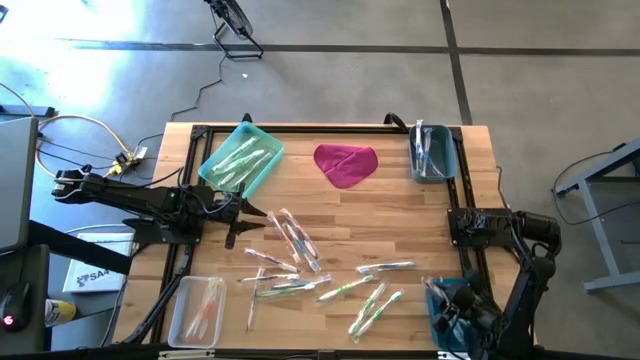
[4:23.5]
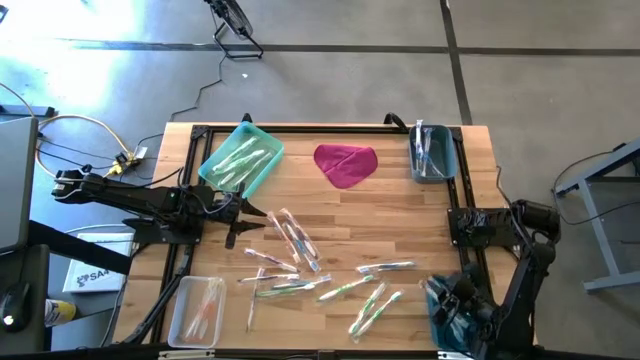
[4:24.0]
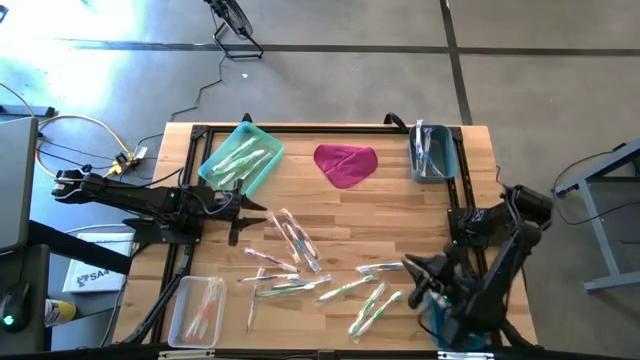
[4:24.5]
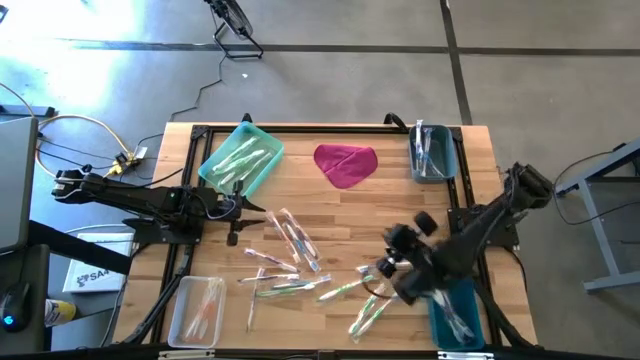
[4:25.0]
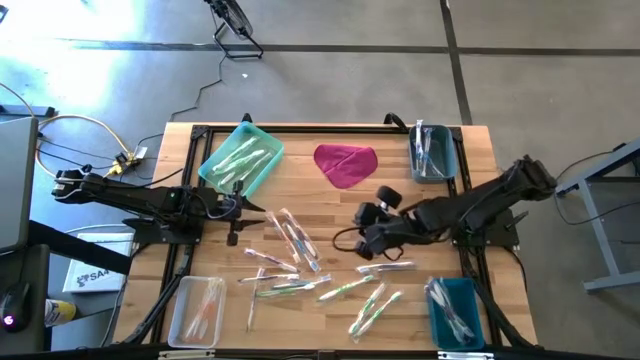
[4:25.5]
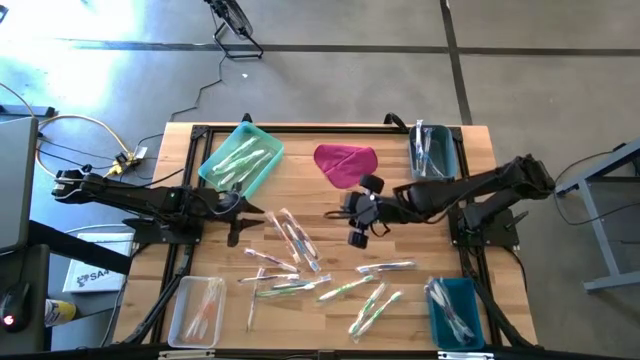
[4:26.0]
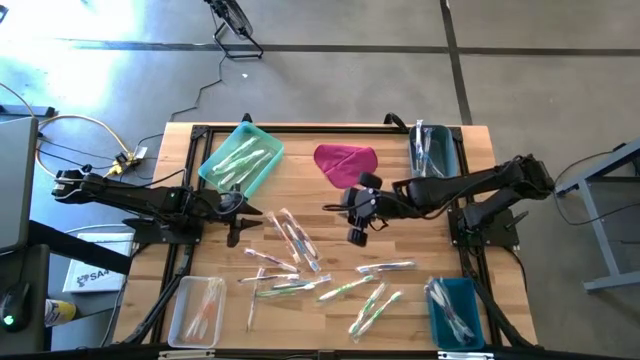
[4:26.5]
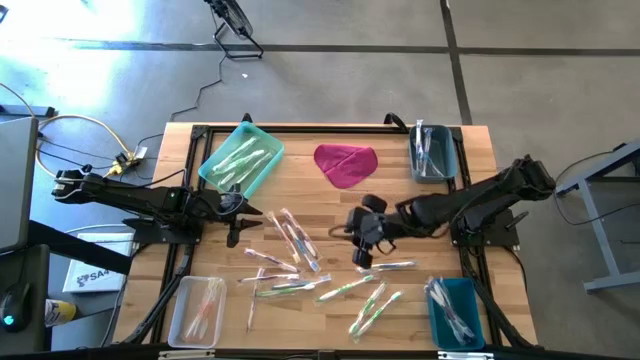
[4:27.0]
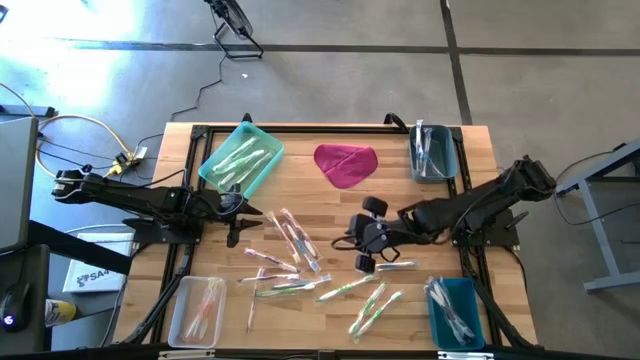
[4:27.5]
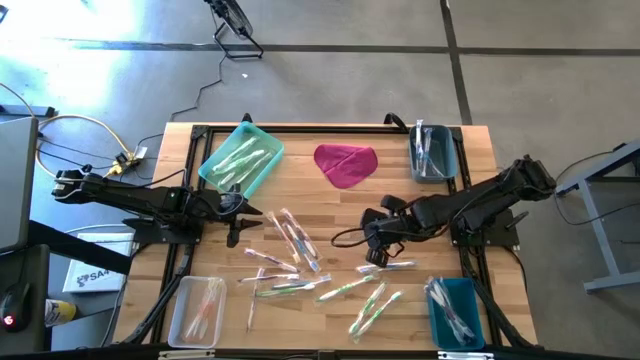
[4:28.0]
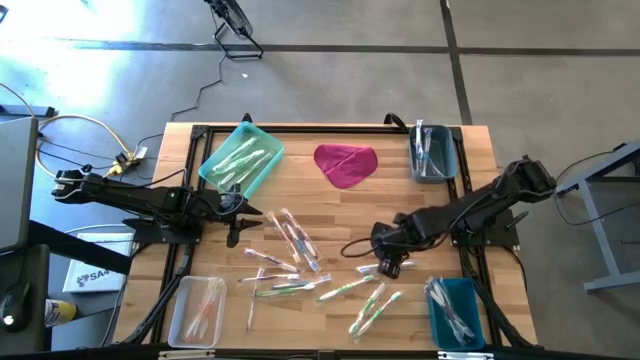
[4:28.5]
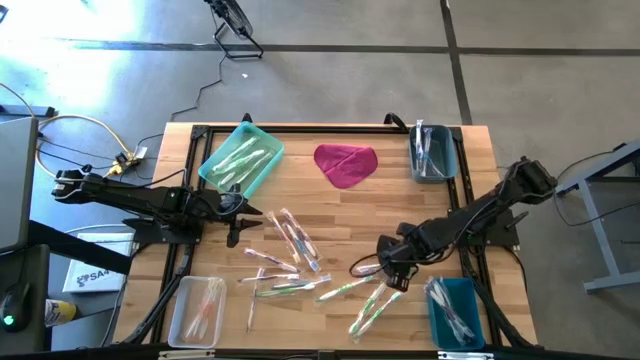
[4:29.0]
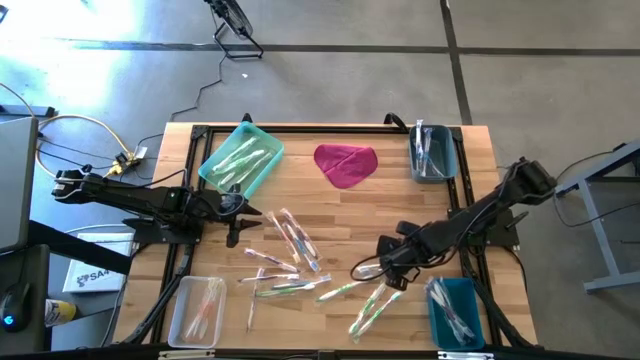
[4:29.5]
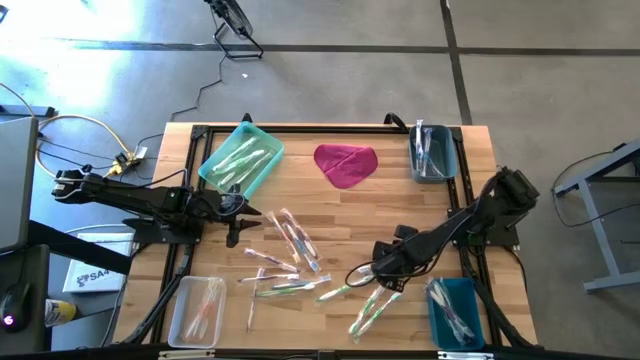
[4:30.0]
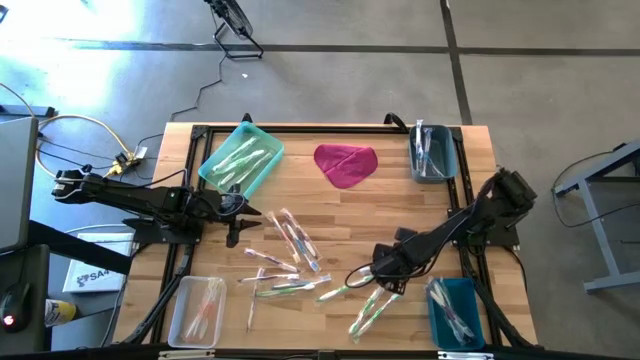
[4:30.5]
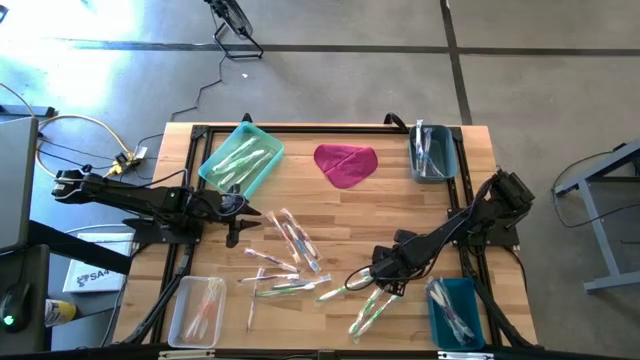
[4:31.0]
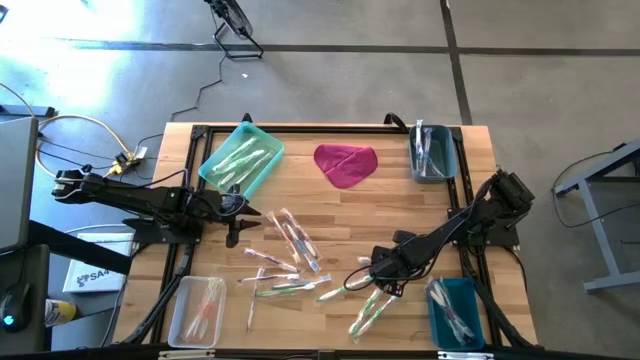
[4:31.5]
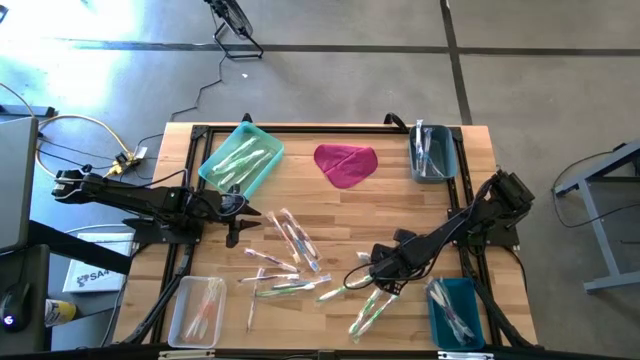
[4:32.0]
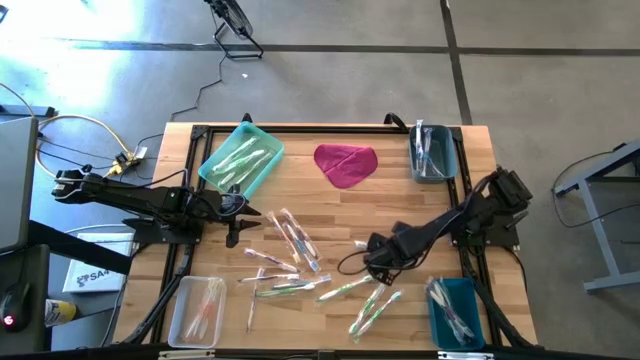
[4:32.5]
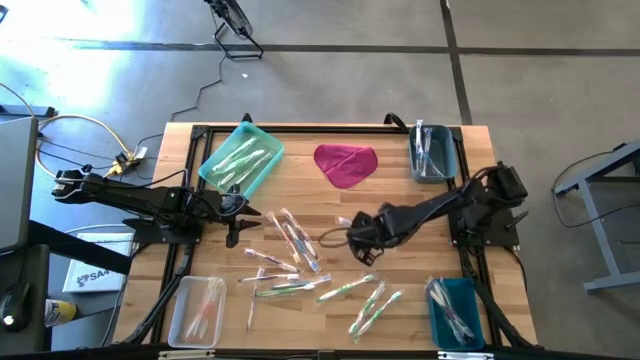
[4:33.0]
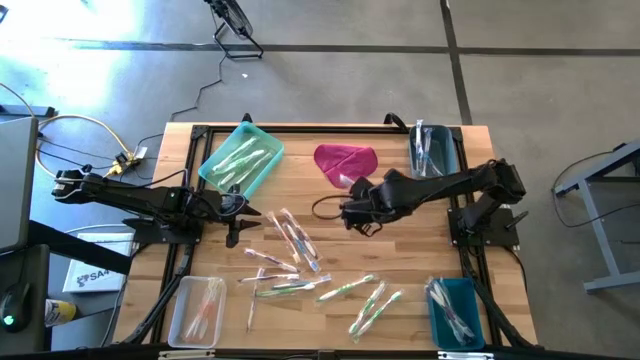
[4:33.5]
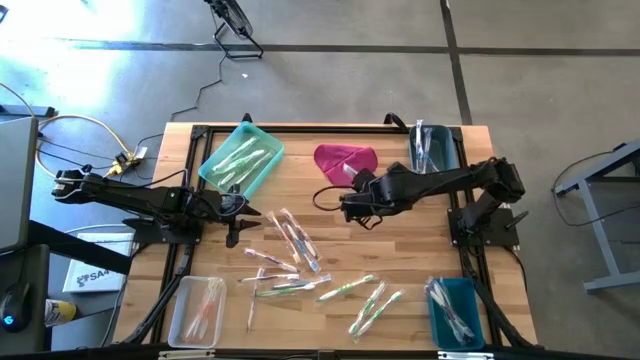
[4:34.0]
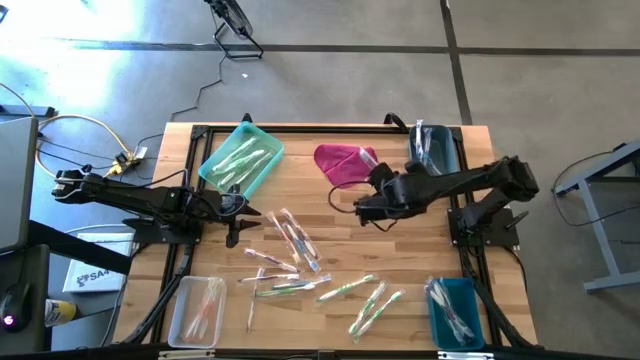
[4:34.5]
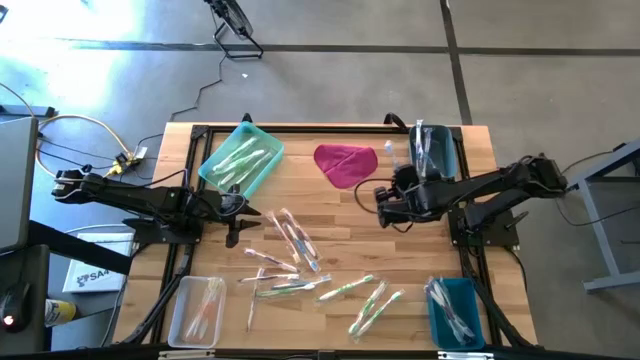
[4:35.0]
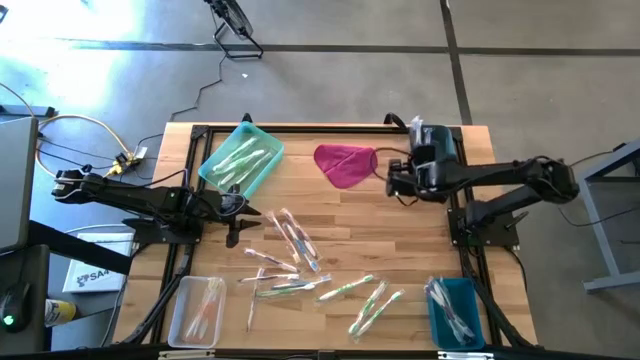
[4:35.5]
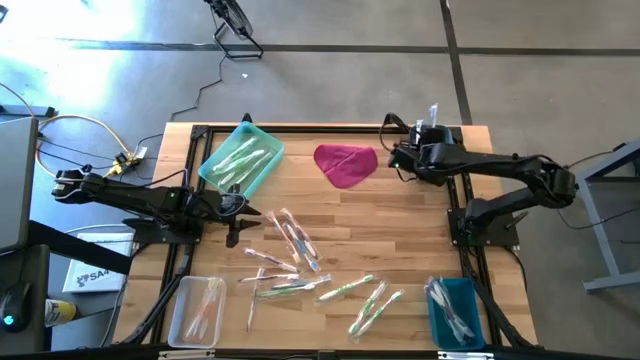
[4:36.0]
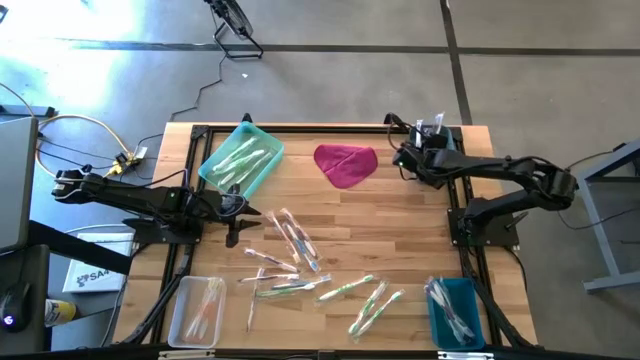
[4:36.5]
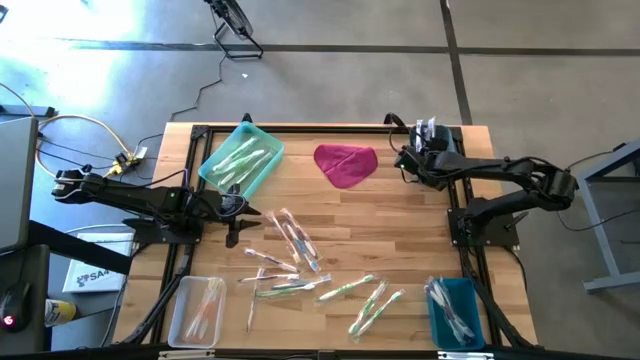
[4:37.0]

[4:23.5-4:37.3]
Task: Pick & Place Toothbrushes
Put the blue toothbrush to the light blue bin

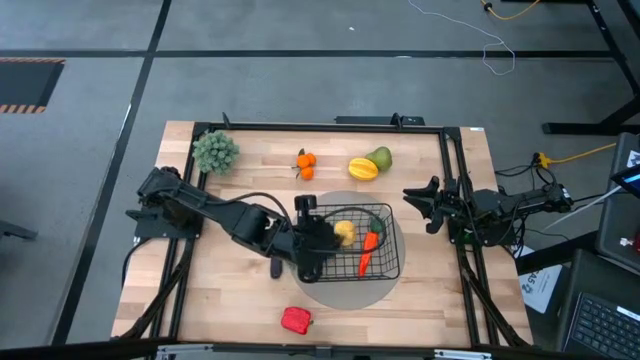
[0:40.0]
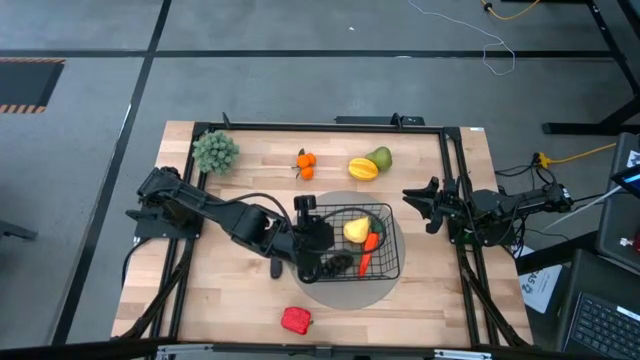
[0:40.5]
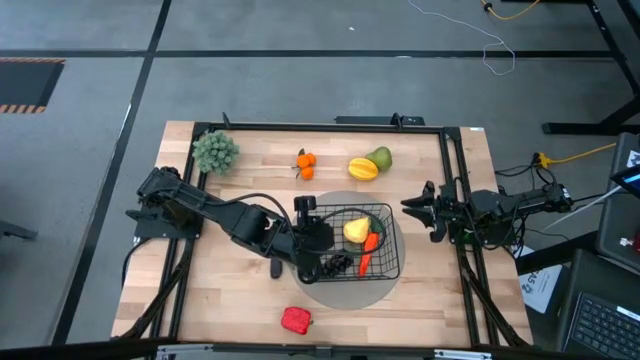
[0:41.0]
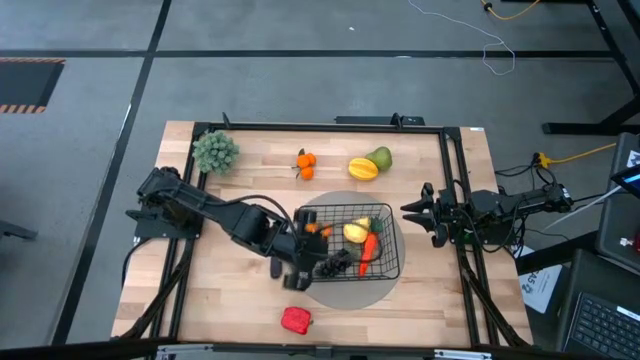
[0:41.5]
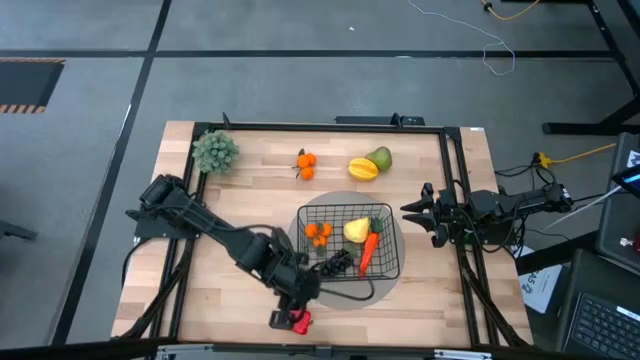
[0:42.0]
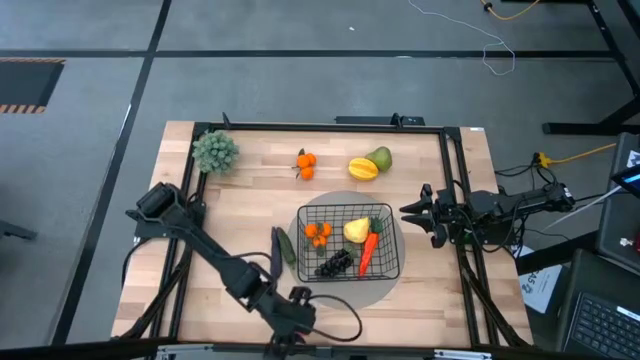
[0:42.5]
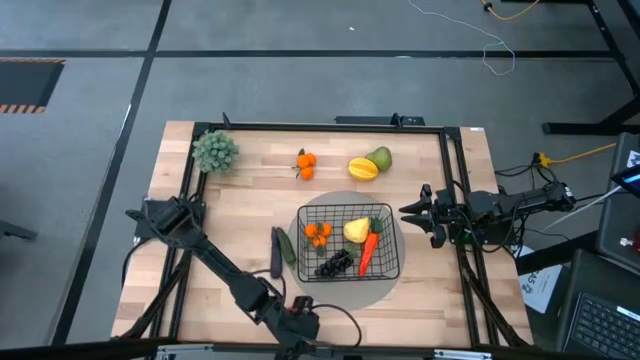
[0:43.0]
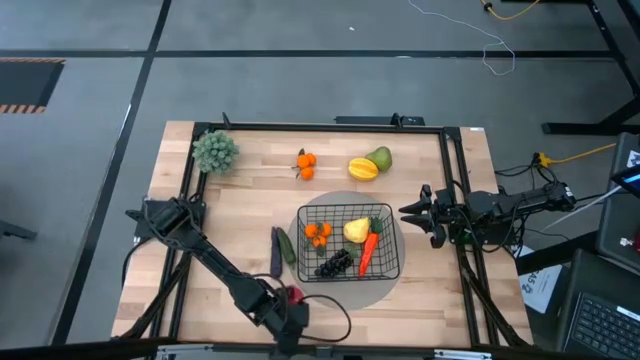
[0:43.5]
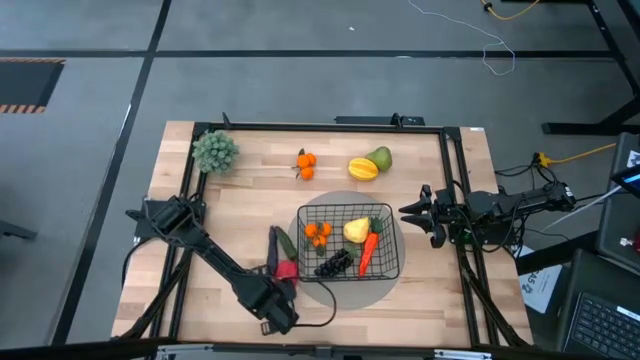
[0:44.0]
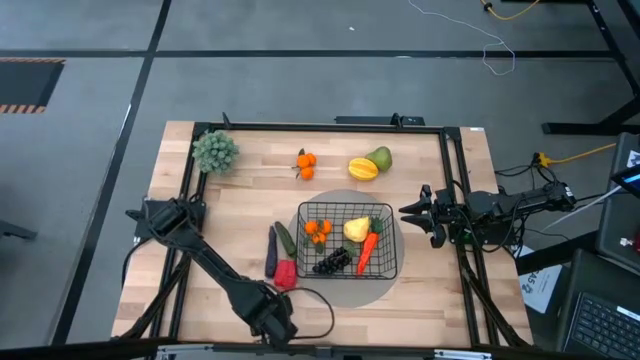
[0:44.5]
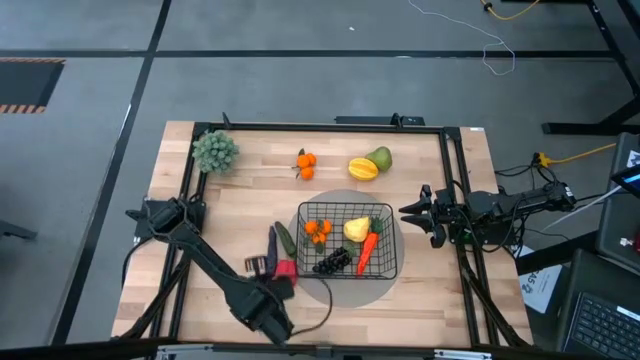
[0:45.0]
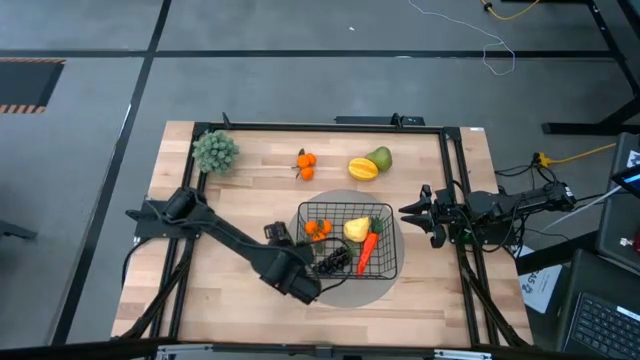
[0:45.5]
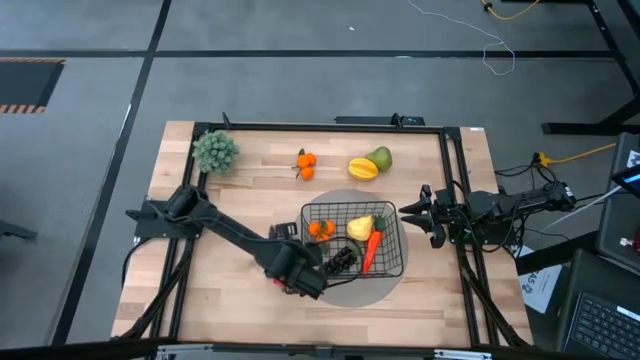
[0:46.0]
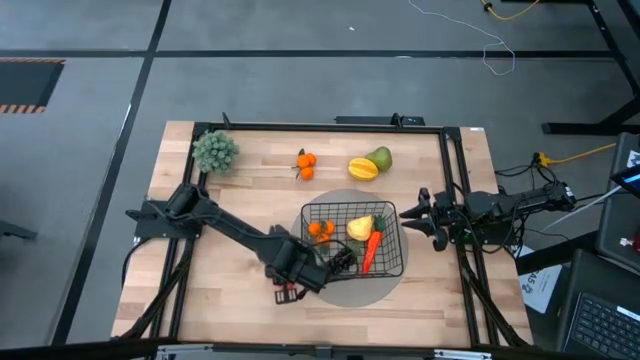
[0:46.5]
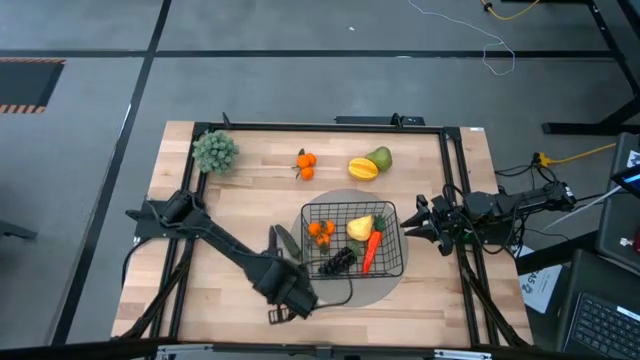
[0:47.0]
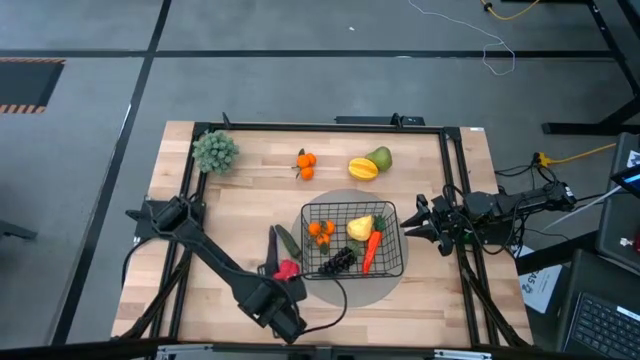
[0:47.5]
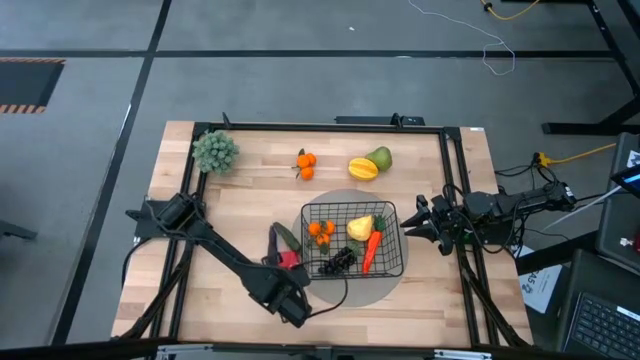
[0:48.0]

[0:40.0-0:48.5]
Task: Build produce basket
Prepare the red bell pepper
